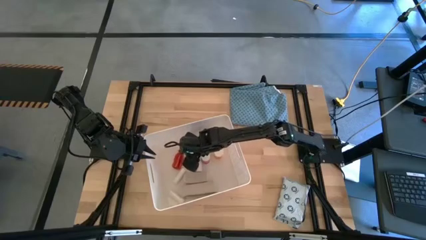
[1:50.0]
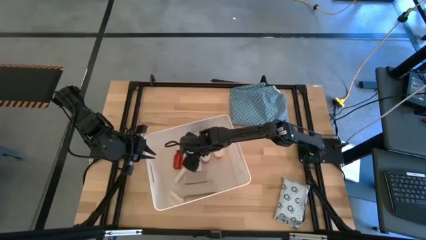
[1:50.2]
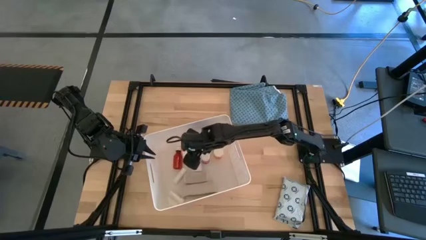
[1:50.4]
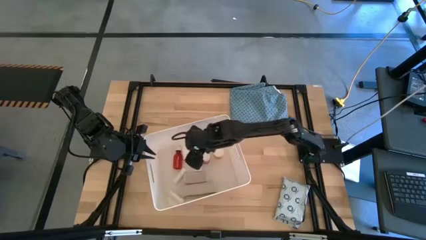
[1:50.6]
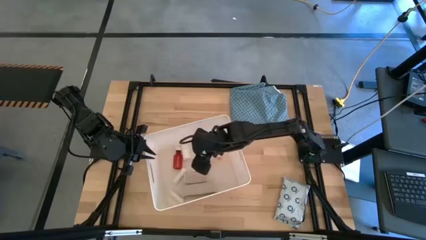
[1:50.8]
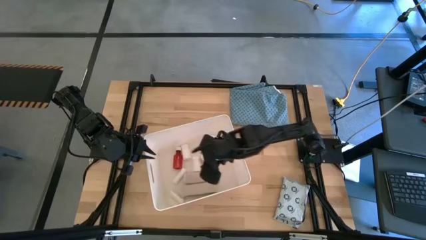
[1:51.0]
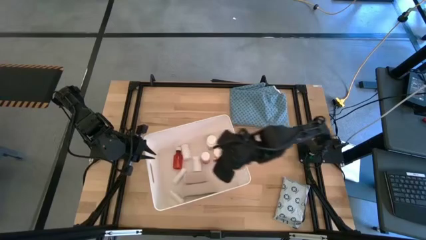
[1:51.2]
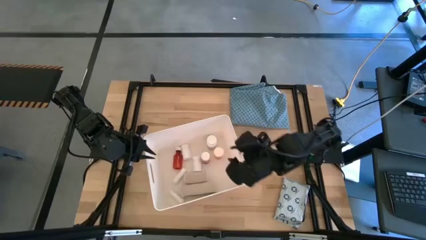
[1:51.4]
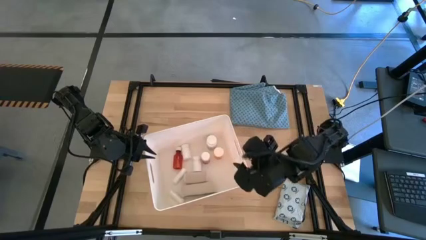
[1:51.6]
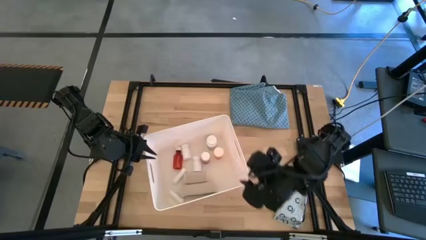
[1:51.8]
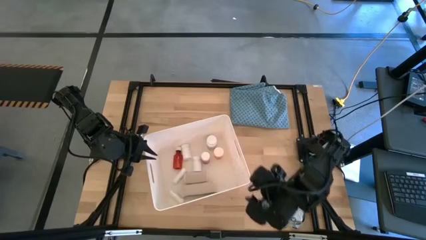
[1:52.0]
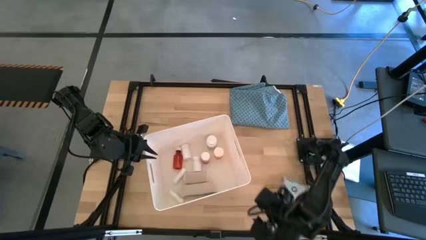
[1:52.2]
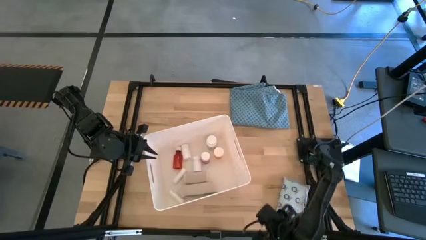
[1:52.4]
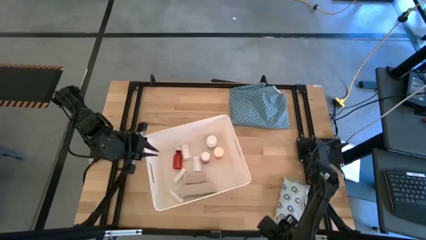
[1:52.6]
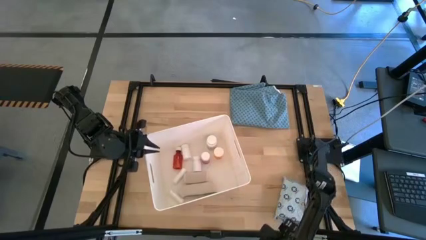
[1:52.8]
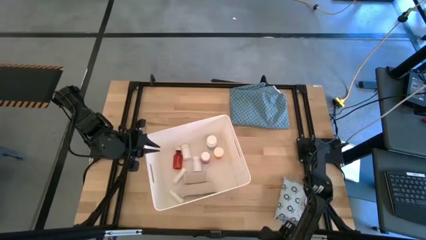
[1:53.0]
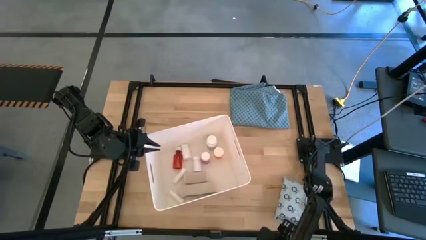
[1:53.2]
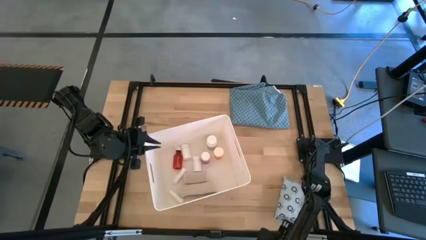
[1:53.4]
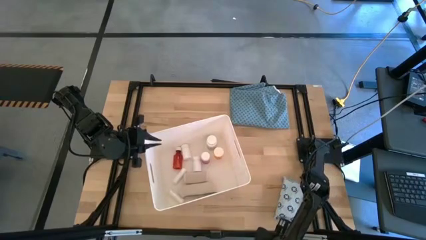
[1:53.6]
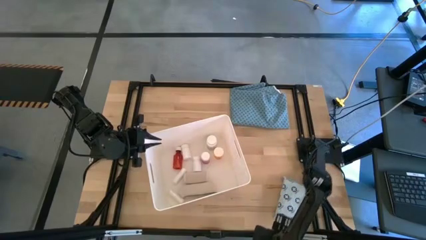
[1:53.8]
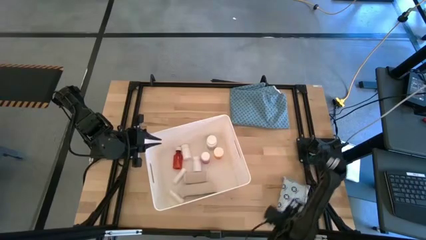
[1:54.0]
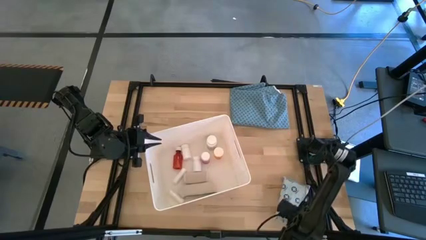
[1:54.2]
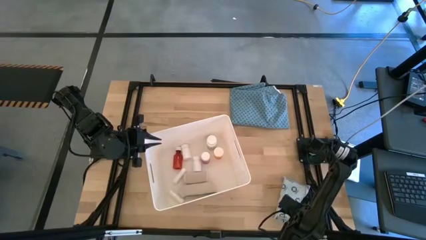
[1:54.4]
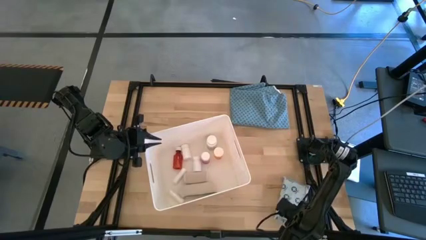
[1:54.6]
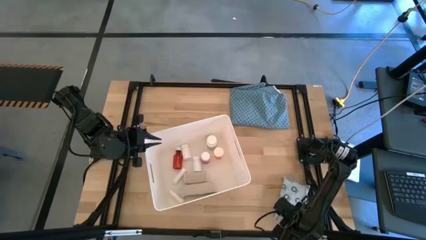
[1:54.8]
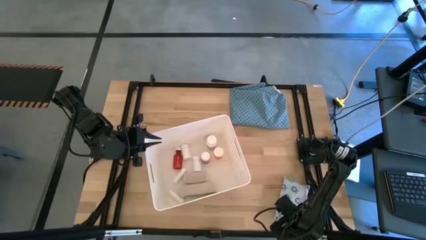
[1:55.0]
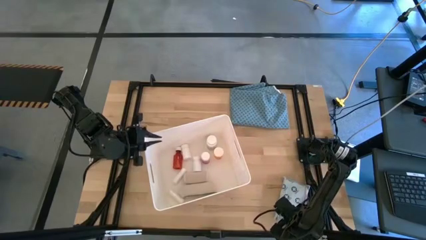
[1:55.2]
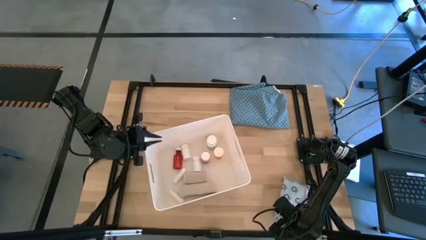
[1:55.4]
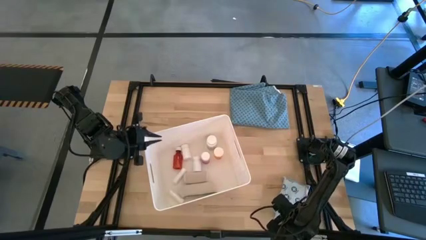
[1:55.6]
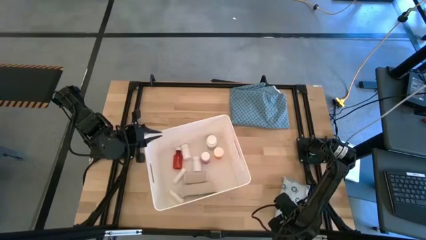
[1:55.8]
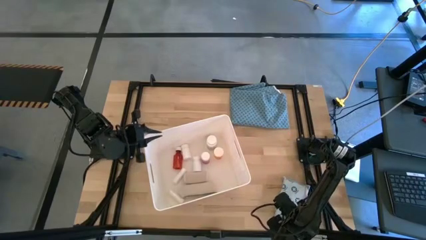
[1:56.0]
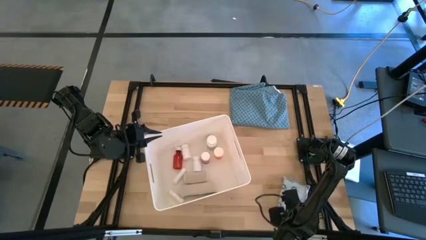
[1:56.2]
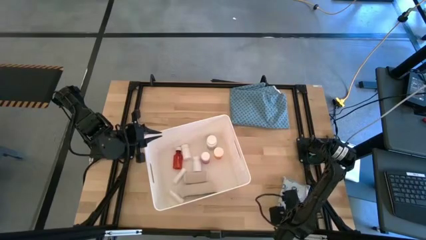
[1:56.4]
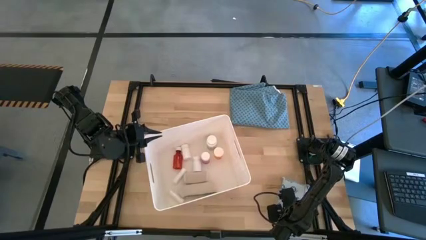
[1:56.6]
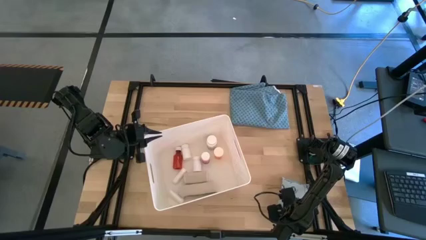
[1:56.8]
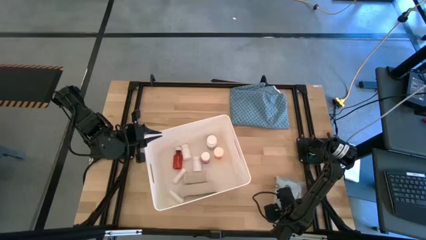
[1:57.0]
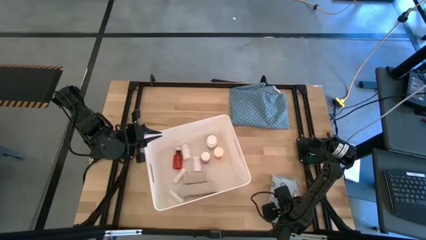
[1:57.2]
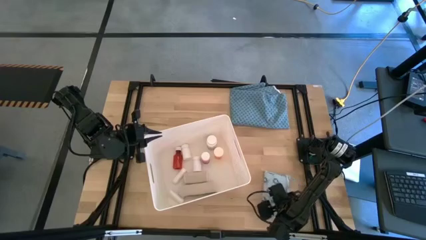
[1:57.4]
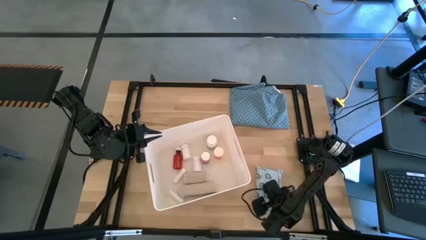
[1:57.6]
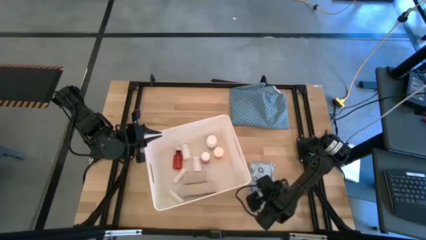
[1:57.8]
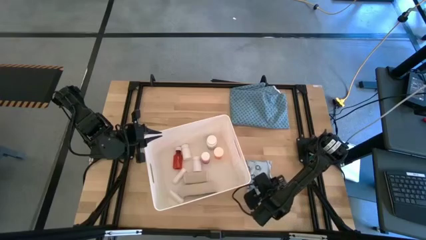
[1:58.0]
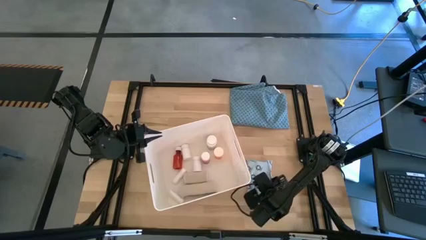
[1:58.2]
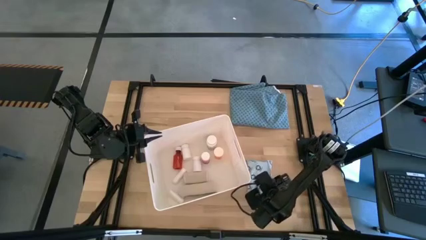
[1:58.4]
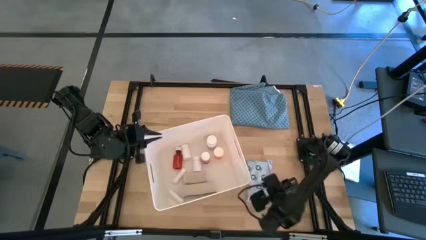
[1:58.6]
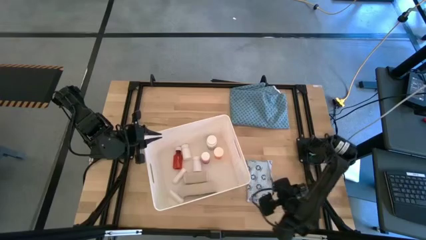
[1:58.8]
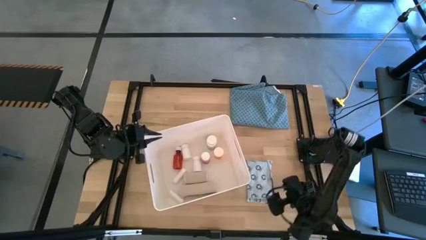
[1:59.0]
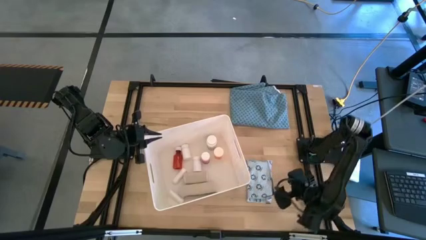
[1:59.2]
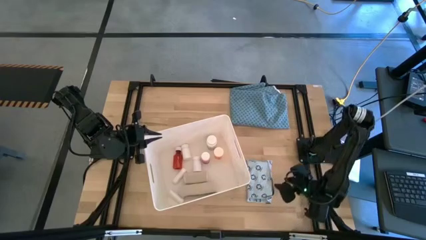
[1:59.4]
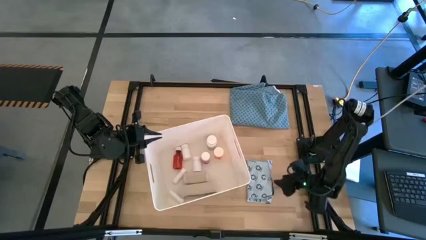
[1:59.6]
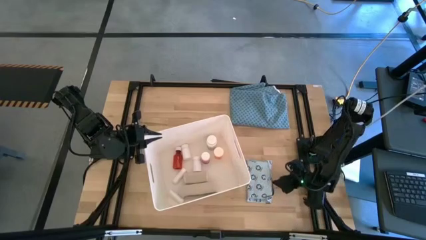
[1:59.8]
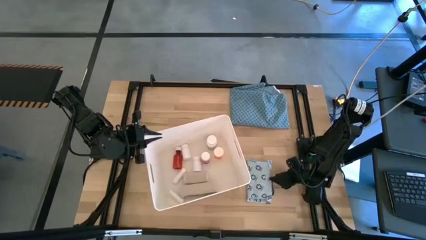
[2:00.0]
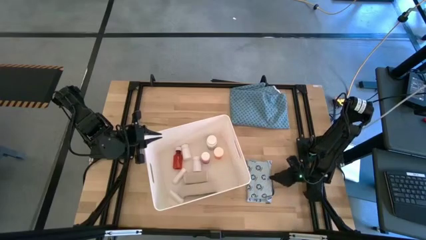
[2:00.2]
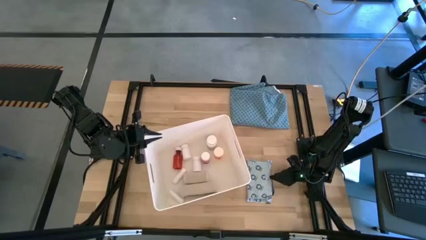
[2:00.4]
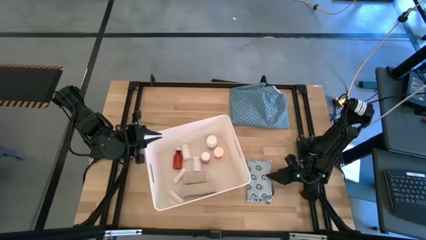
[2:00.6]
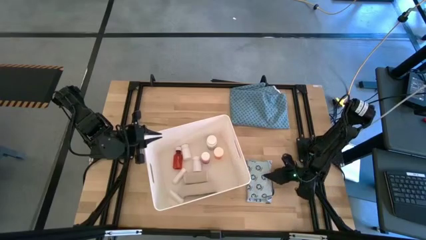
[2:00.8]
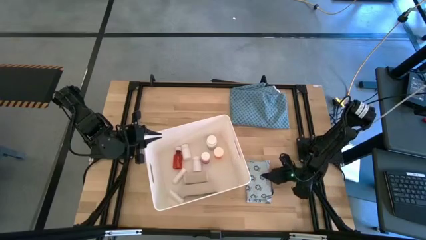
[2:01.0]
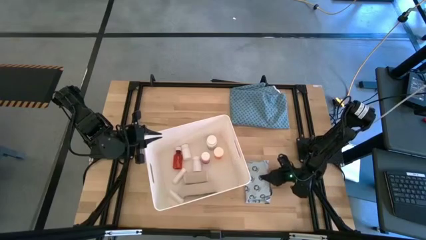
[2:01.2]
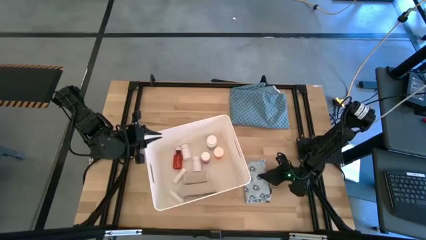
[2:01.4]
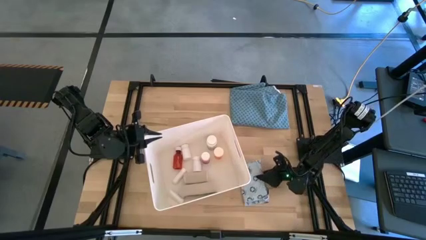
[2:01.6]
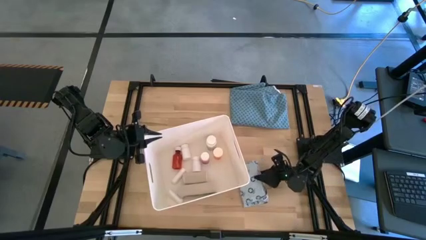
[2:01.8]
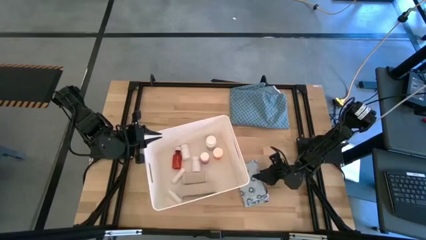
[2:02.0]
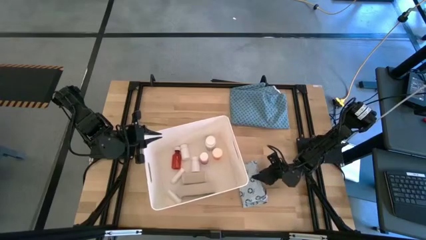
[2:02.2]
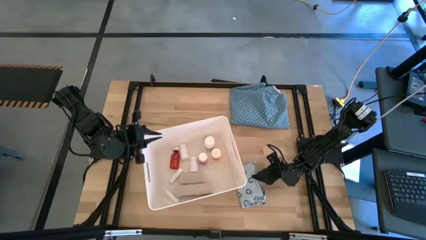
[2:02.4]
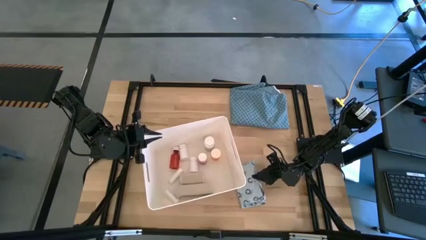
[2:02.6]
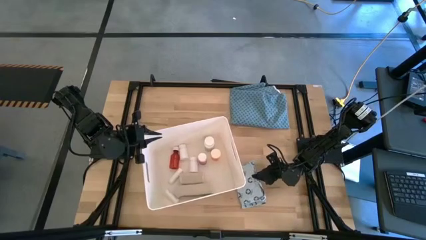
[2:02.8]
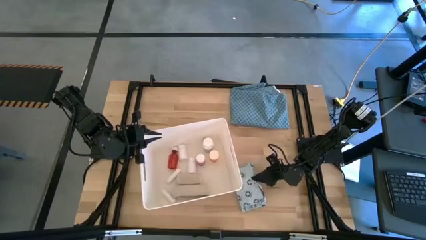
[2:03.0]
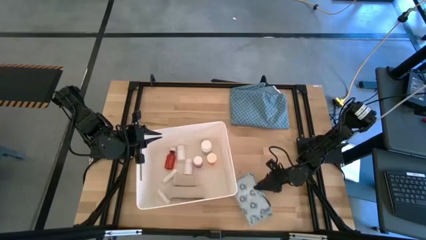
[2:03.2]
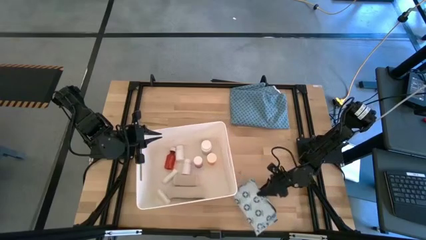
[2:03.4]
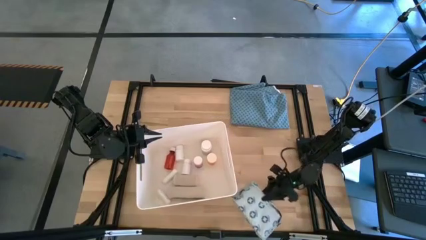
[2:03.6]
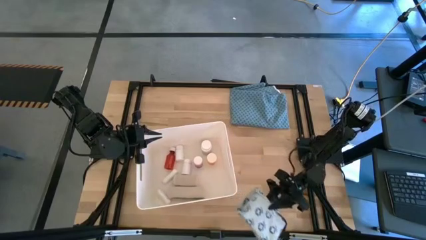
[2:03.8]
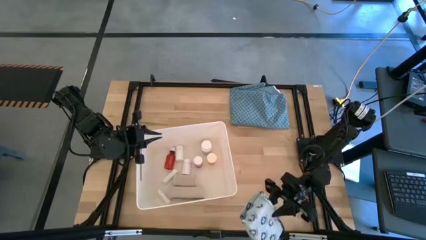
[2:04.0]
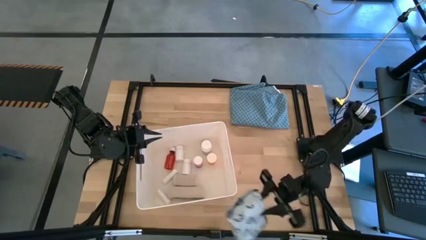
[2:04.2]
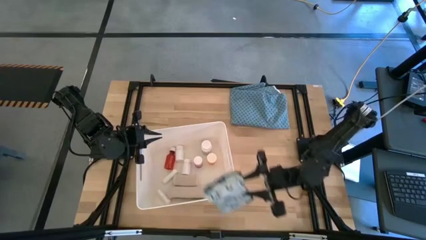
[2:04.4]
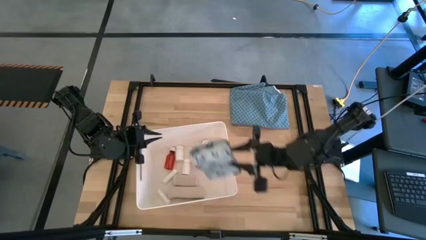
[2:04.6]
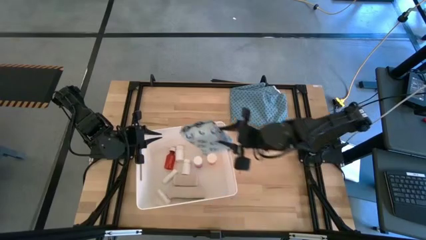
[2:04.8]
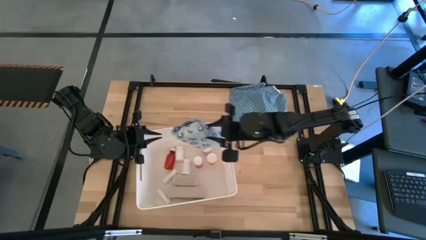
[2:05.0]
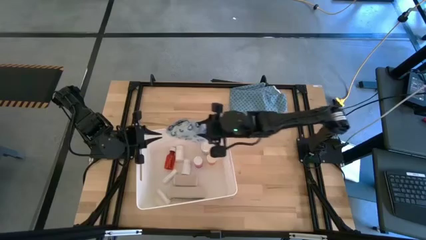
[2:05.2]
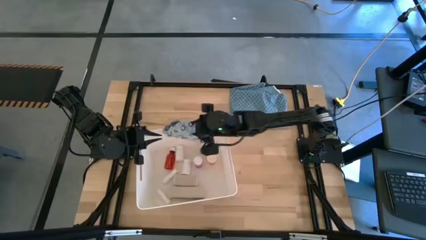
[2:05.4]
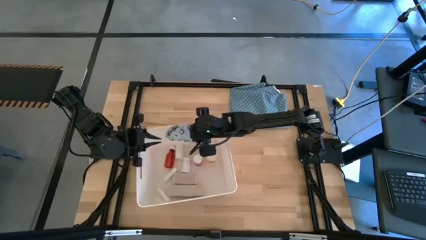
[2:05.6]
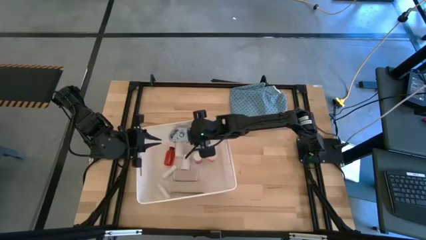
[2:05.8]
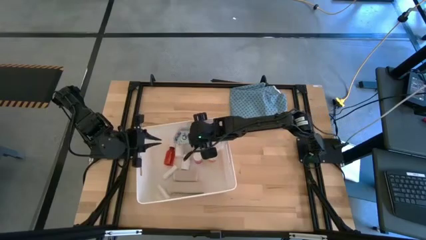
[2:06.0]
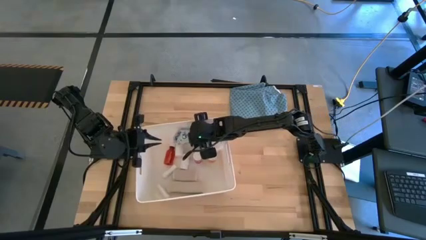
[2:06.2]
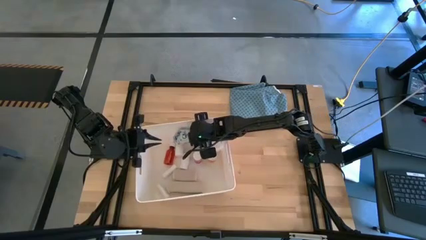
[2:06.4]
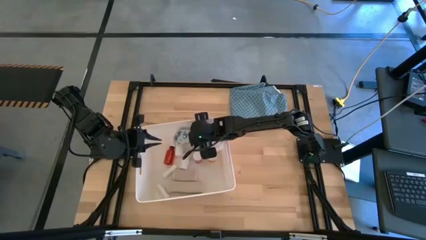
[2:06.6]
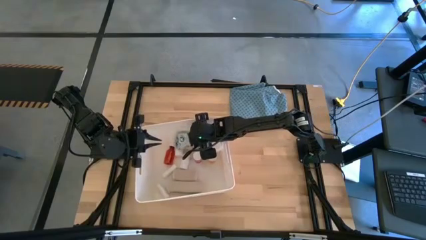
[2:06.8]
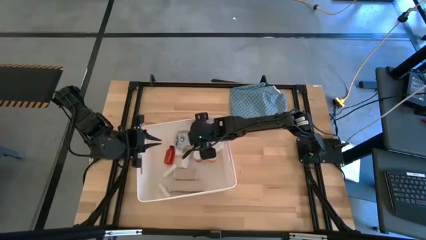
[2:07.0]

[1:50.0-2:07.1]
Task: Pick & place medical supplies in basket/bin
Put the mailer bag into the white bin
